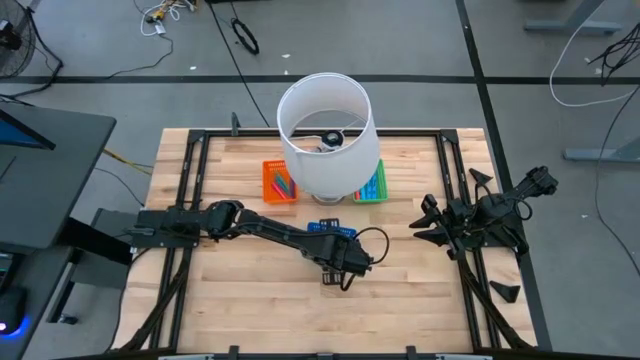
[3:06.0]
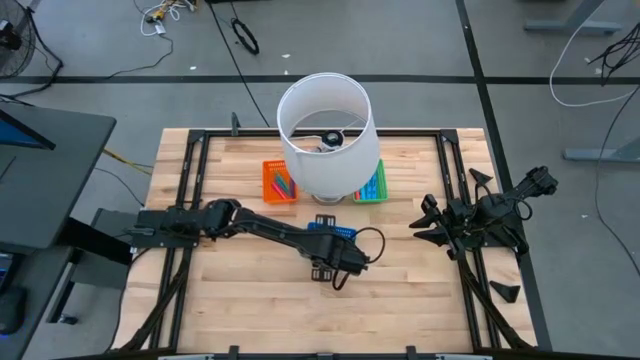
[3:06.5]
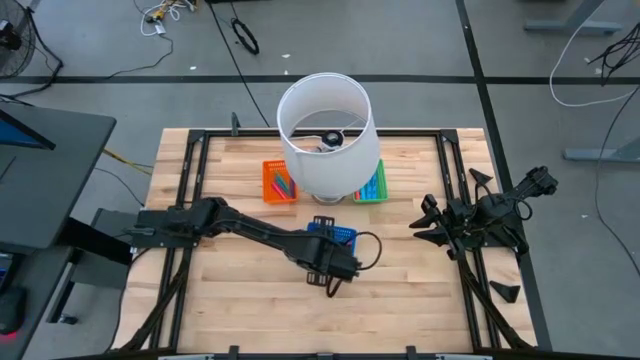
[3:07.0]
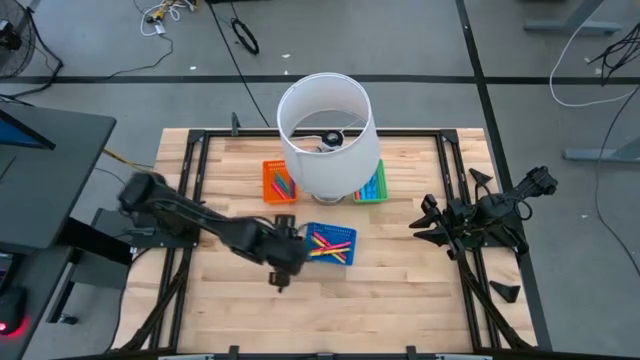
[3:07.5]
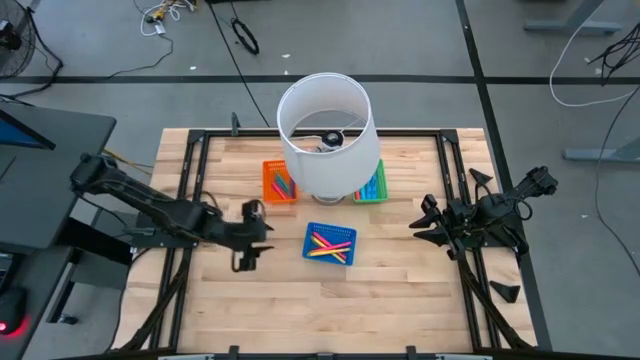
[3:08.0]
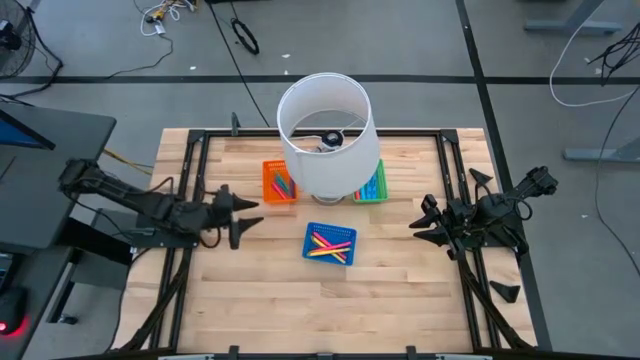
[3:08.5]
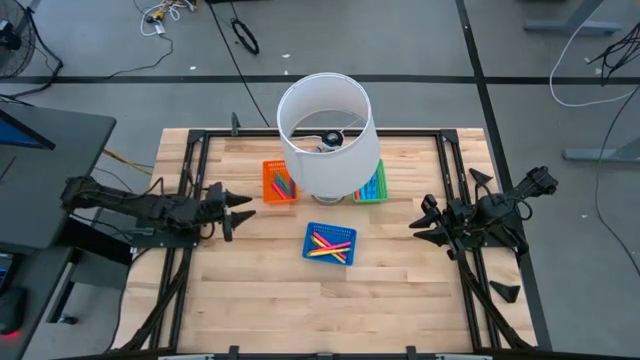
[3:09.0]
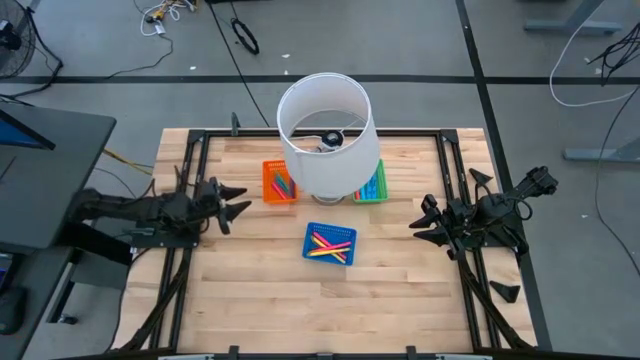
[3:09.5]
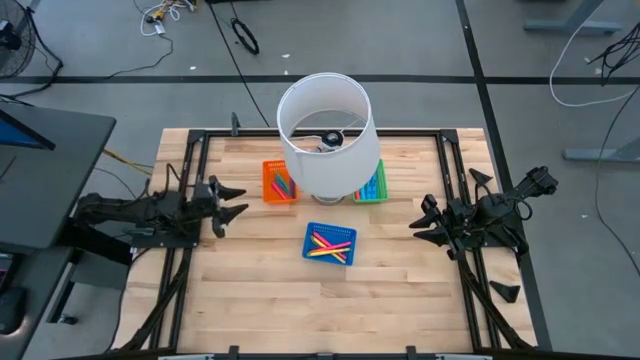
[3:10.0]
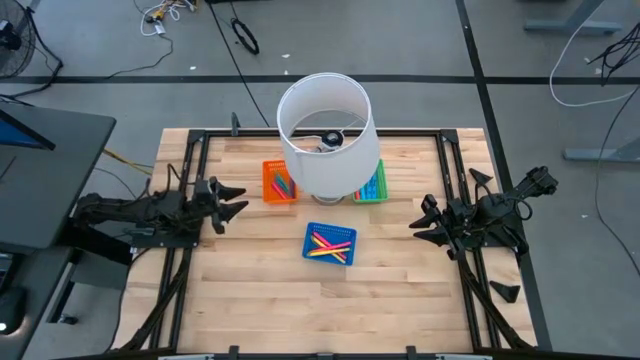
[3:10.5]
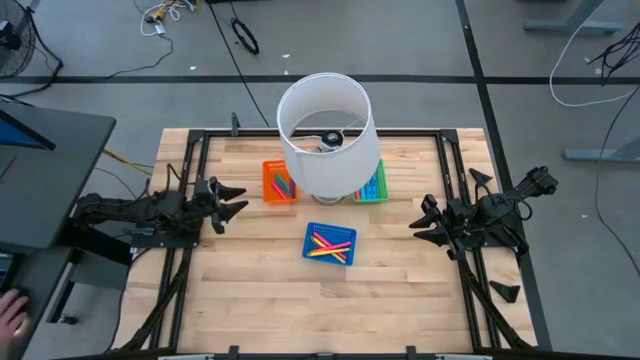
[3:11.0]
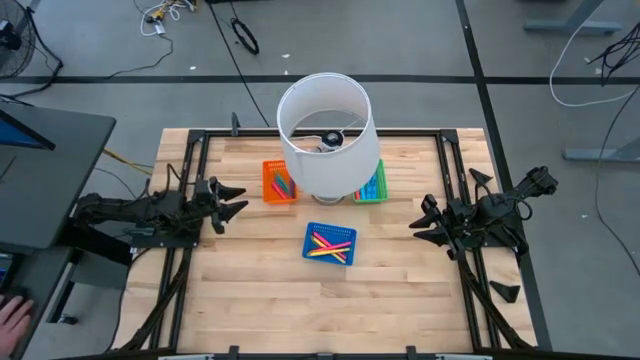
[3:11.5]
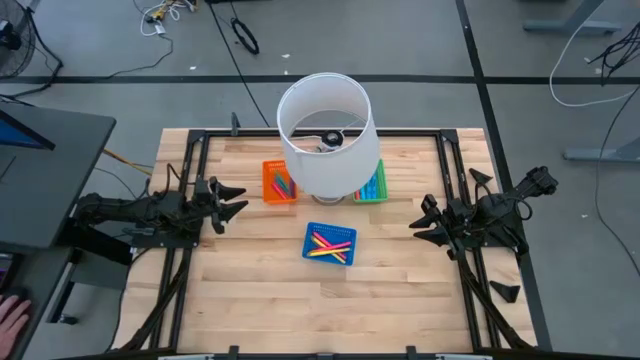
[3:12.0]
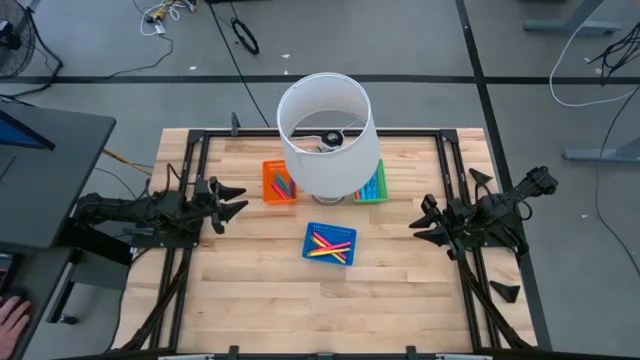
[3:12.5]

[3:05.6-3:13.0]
Task: Pick & Place Markers
Return to Home Position

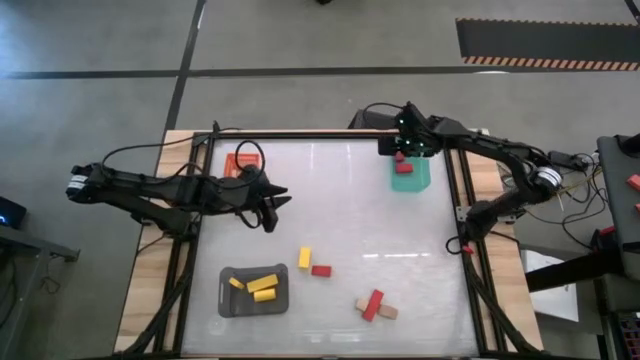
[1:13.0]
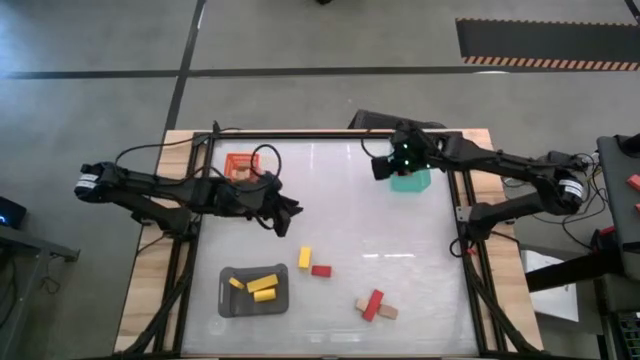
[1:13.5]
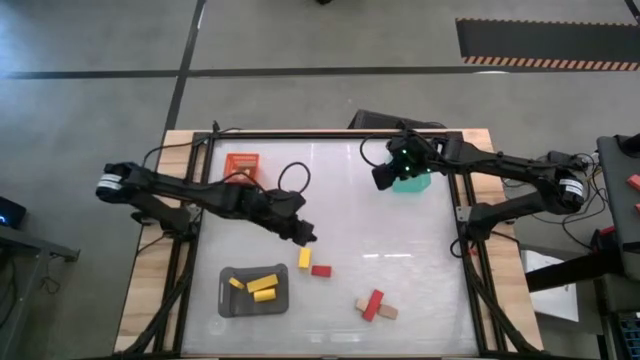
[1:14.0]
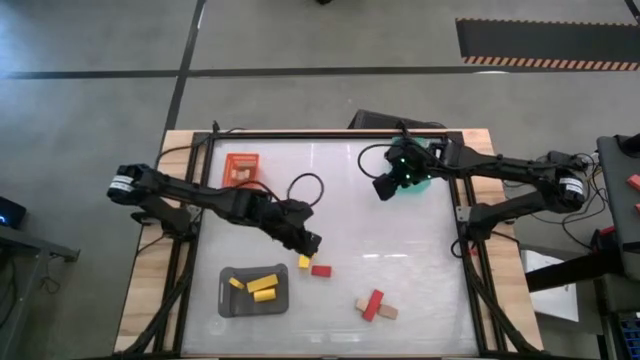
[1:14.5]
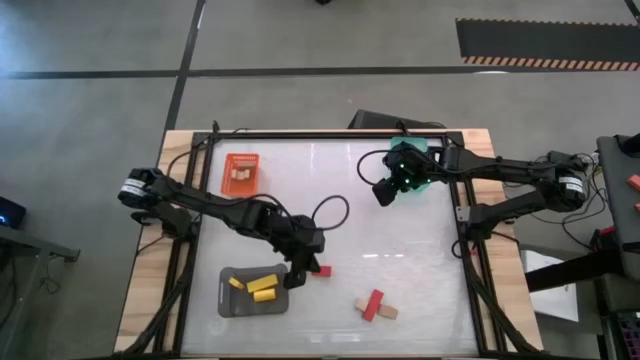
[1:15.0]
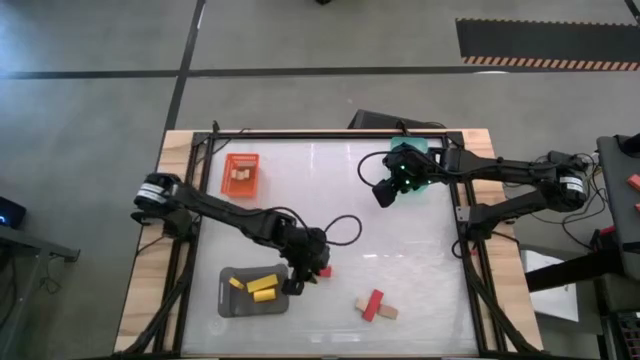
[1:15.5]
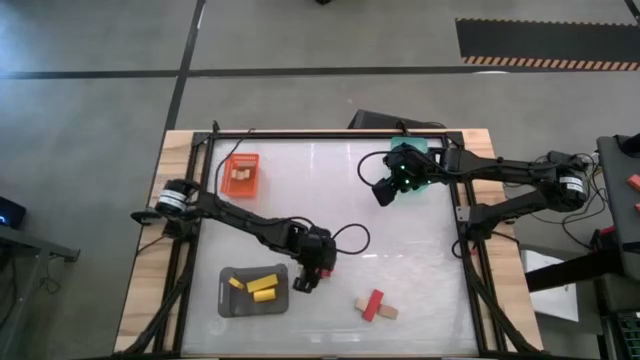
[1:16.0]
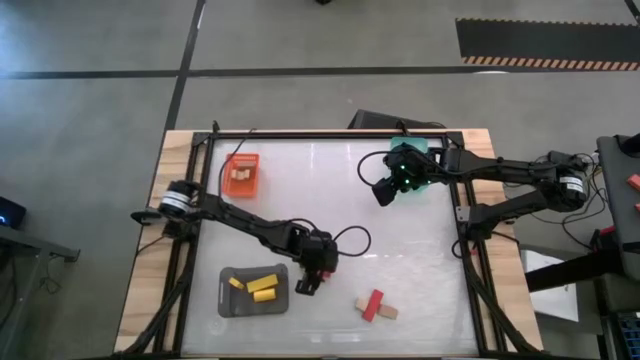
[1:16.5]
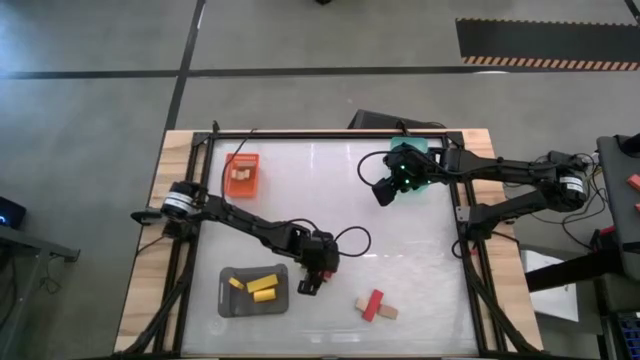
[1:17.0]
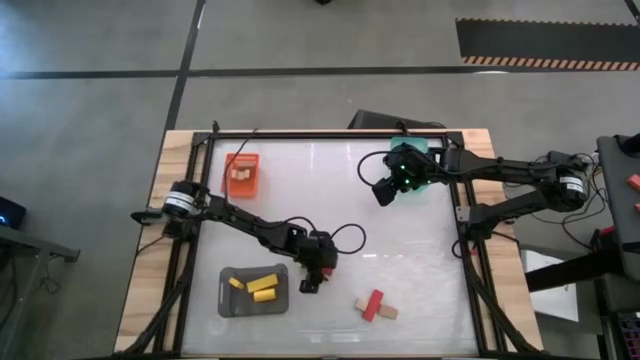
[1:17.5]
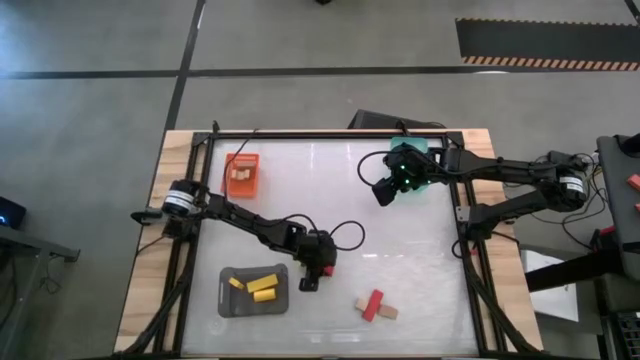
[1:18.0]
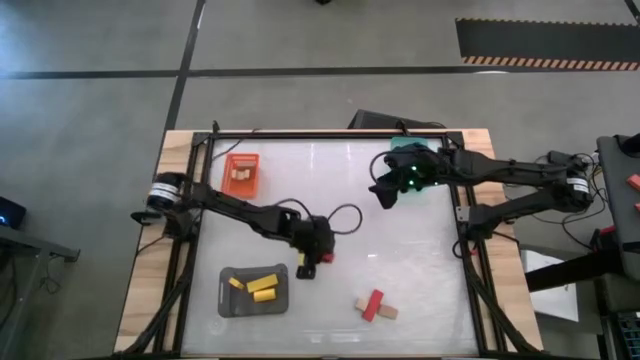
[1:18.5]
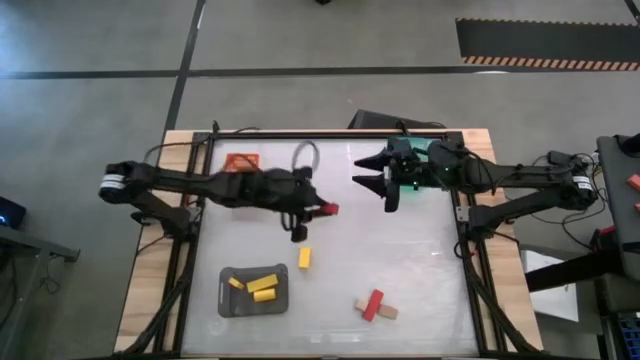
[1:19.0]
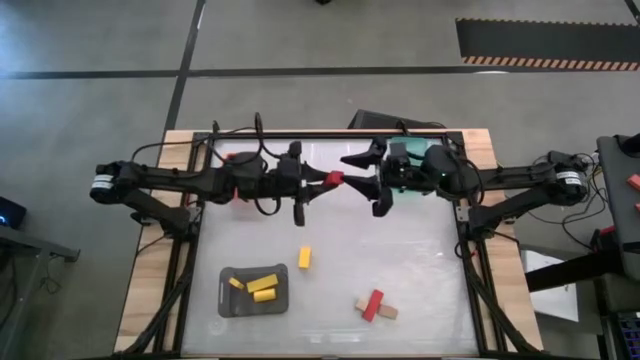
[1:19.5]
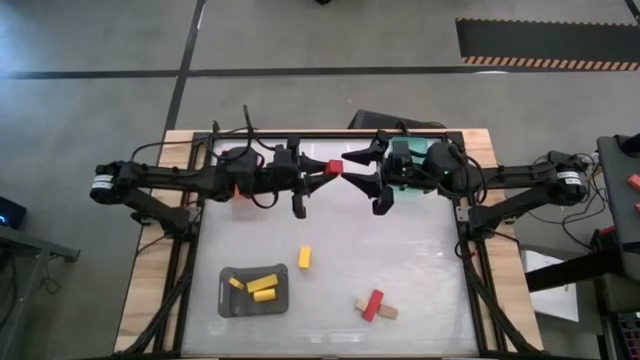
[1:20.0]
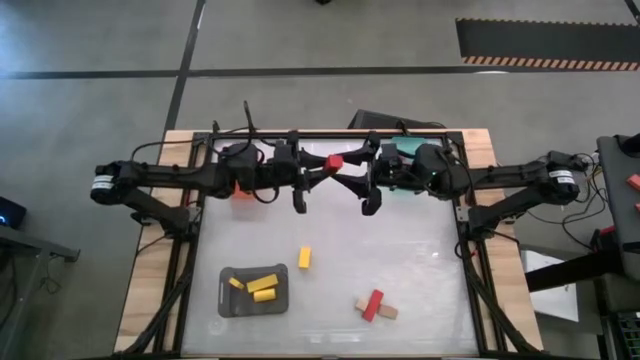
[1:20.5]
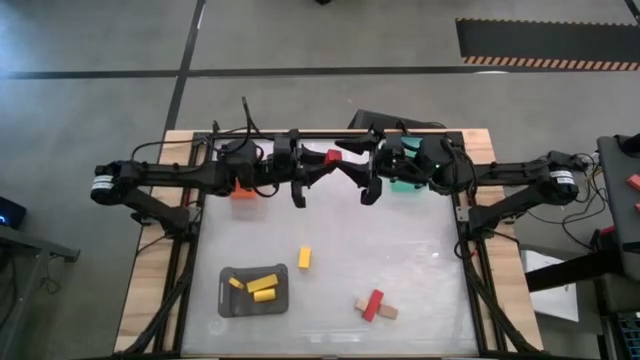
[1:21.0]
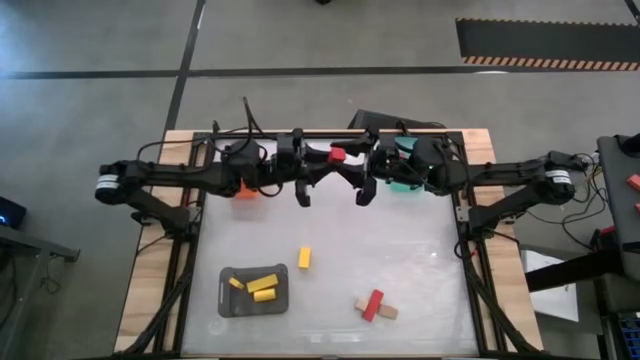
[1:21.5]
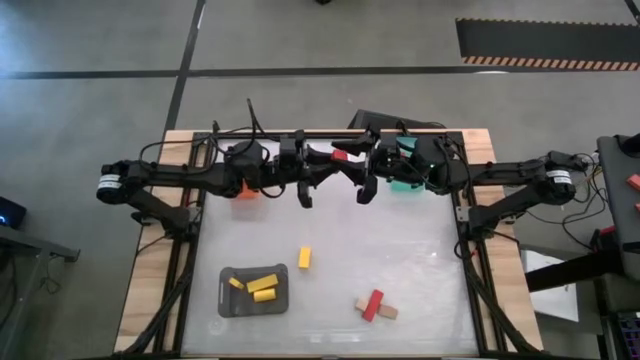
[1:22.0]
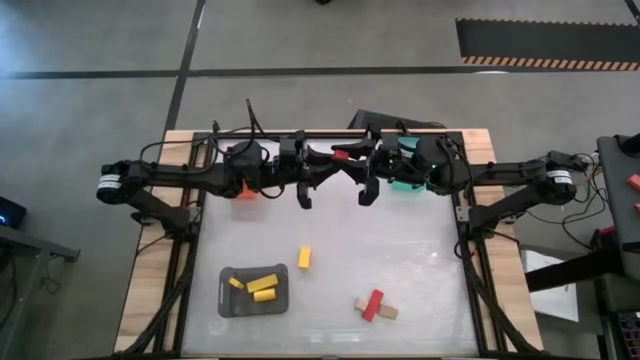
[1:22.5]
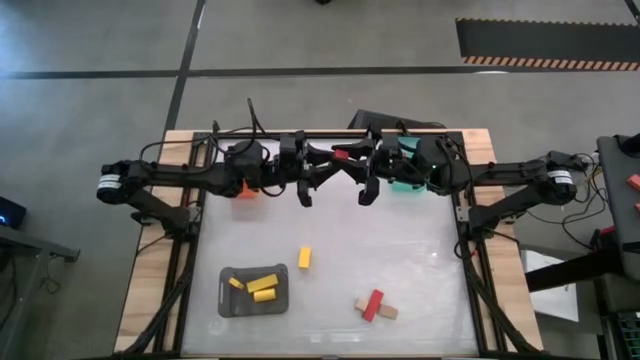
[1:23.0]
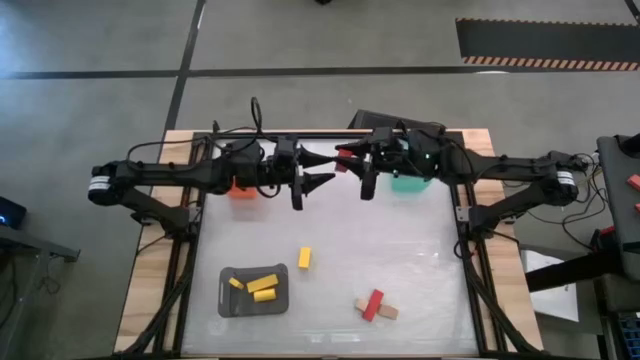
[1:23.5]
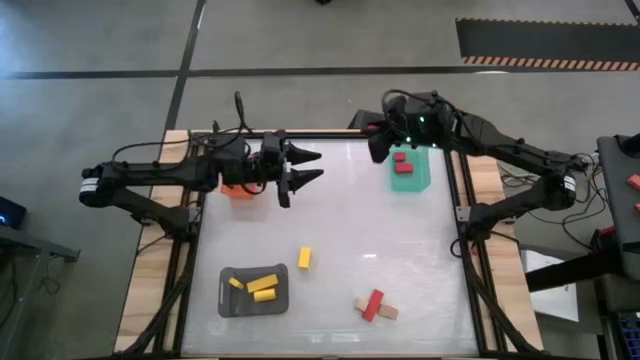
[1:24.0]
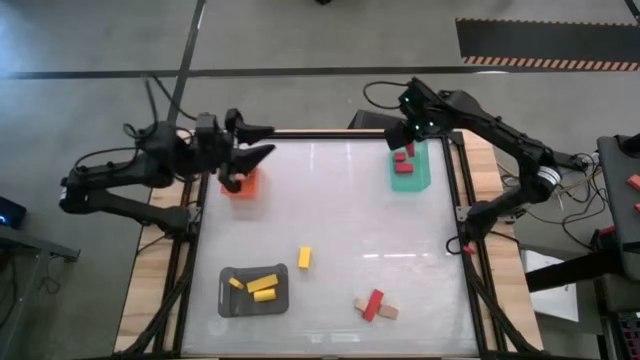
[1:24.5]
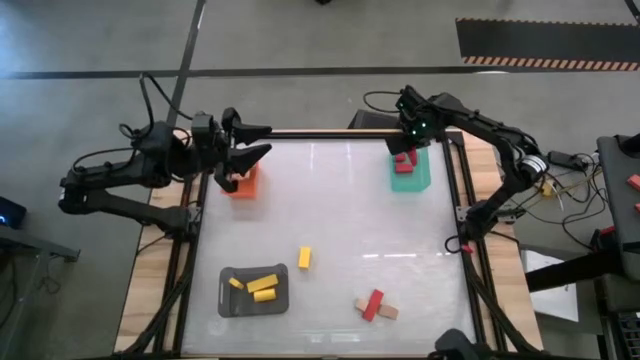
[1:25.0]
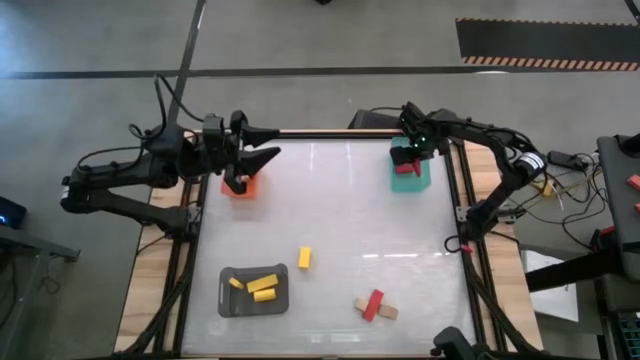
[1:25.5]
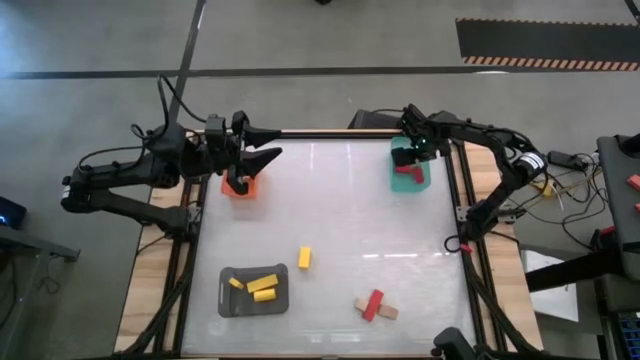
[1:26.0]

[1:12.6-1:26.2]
Task: Sort & place blocks by color
Put the red block into the green bin
